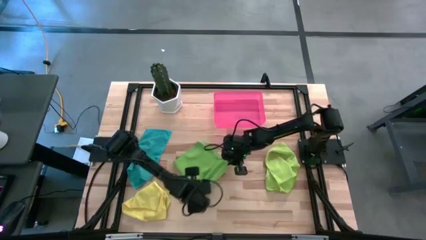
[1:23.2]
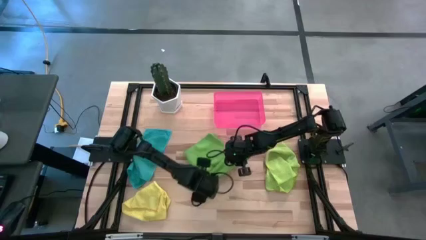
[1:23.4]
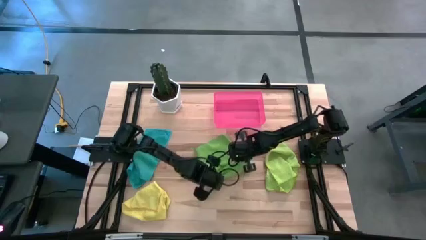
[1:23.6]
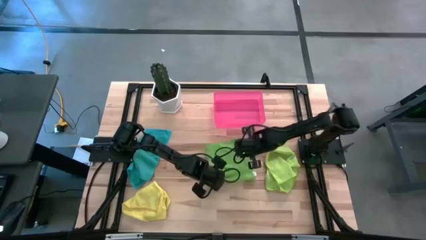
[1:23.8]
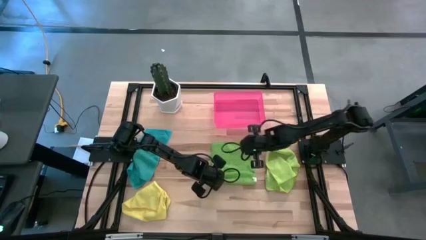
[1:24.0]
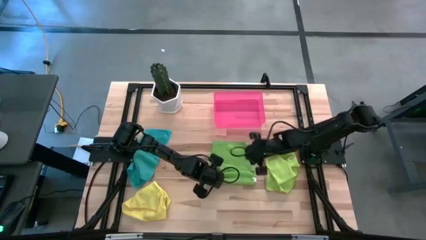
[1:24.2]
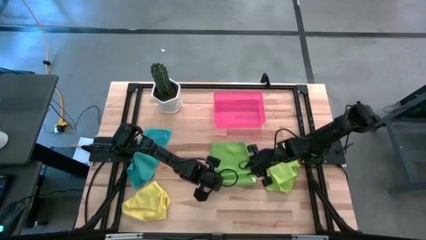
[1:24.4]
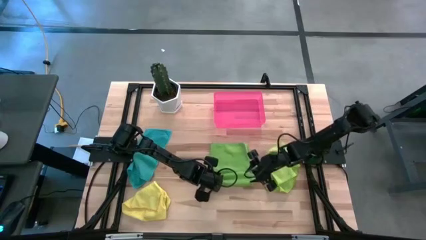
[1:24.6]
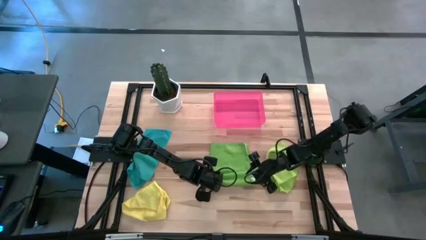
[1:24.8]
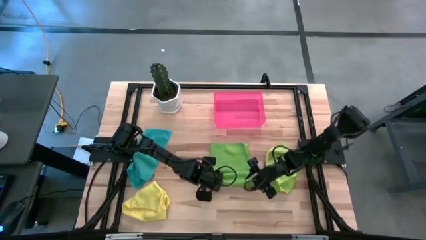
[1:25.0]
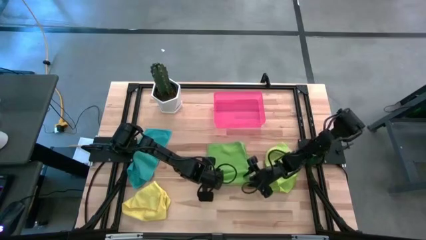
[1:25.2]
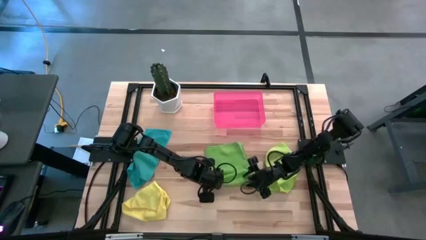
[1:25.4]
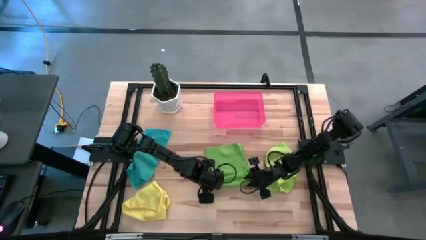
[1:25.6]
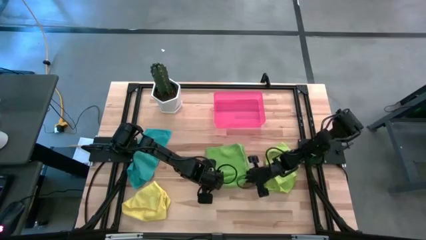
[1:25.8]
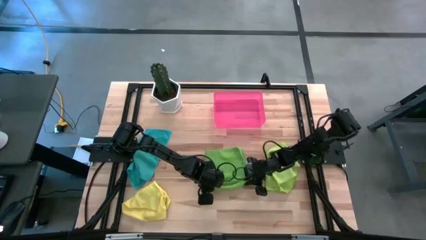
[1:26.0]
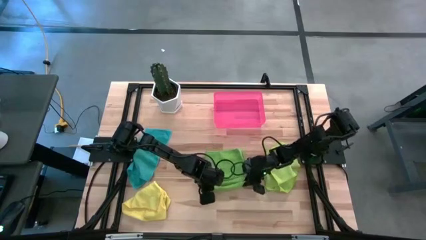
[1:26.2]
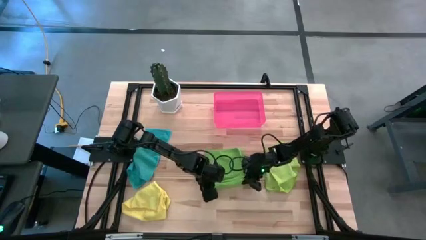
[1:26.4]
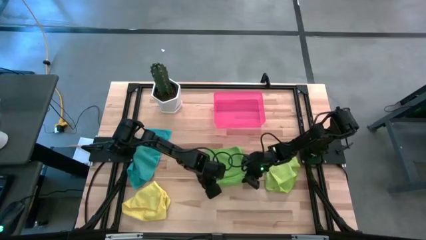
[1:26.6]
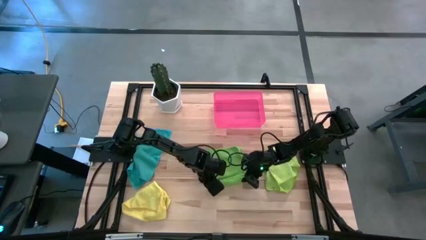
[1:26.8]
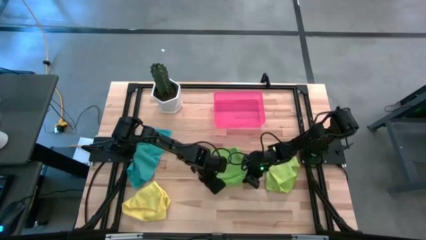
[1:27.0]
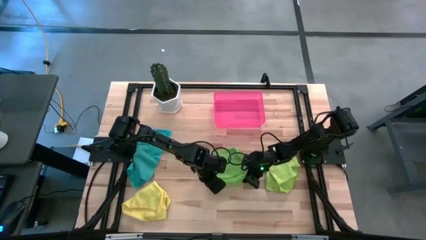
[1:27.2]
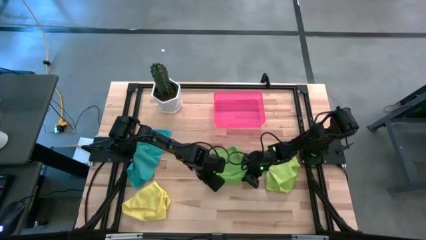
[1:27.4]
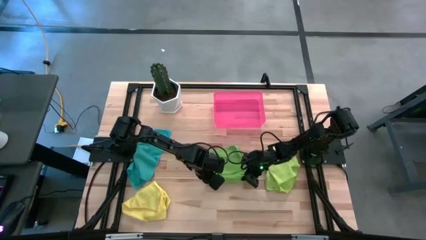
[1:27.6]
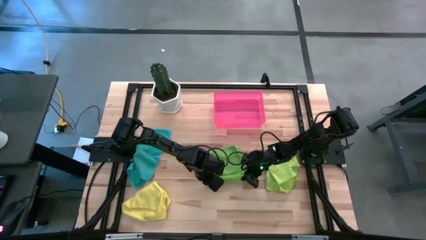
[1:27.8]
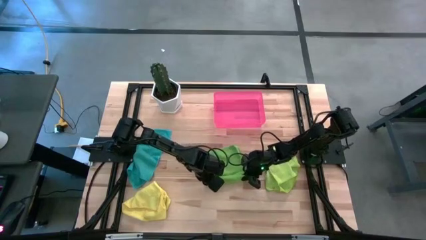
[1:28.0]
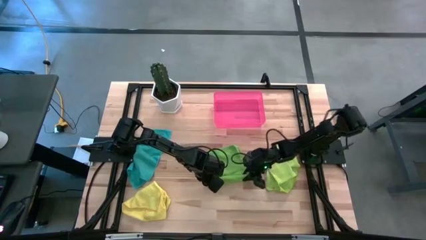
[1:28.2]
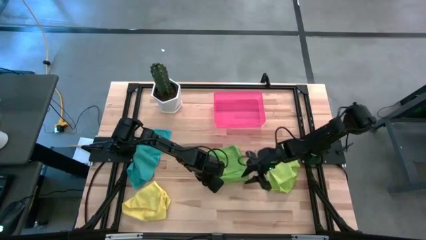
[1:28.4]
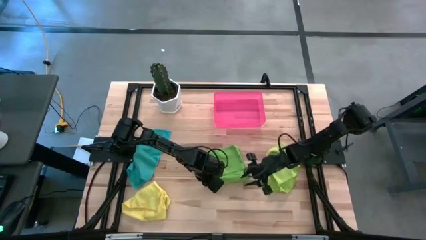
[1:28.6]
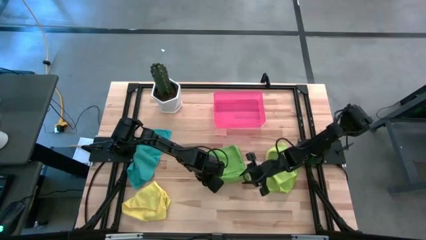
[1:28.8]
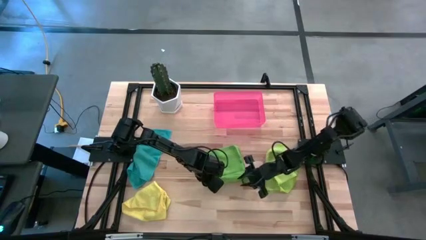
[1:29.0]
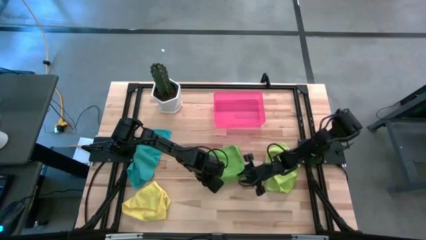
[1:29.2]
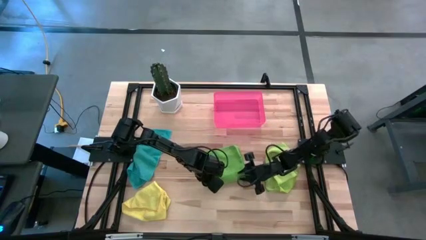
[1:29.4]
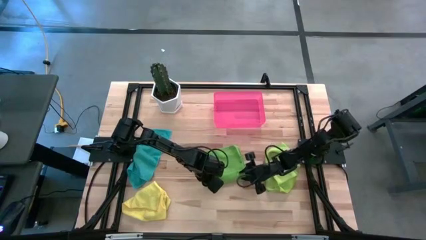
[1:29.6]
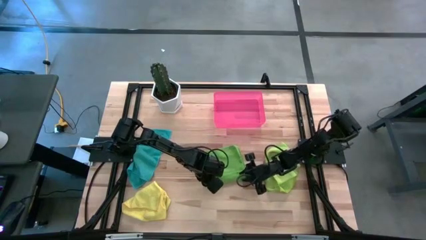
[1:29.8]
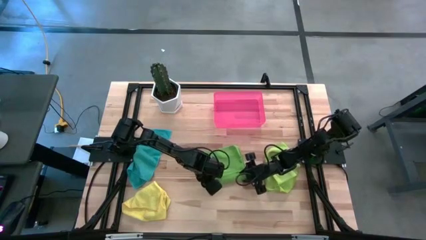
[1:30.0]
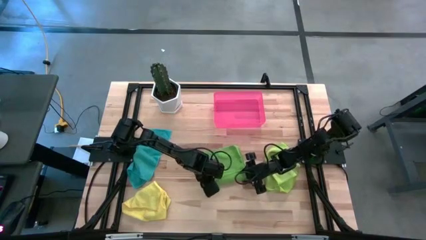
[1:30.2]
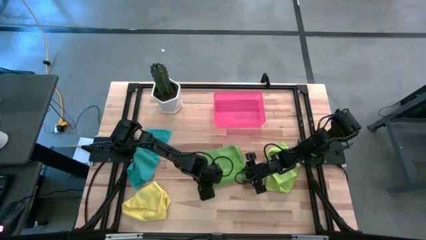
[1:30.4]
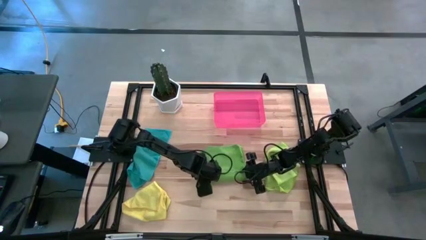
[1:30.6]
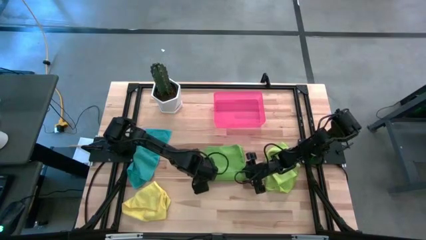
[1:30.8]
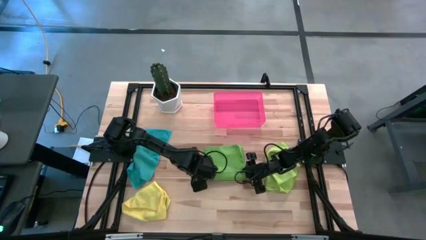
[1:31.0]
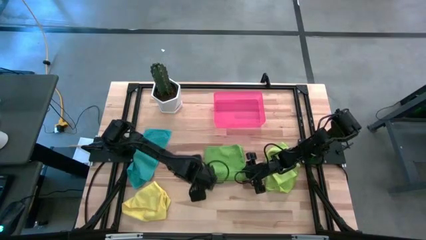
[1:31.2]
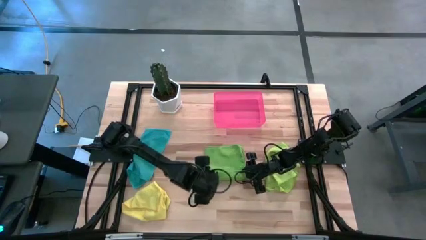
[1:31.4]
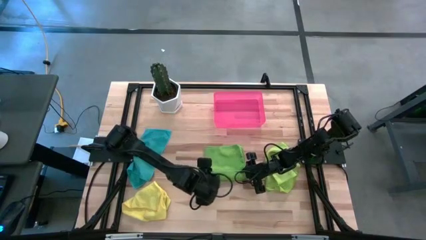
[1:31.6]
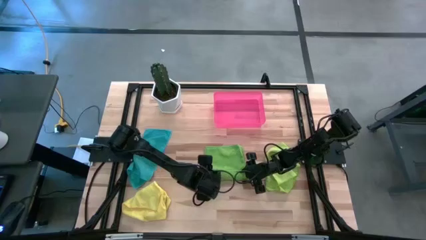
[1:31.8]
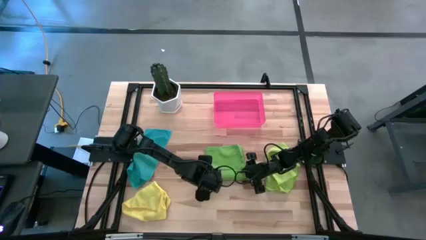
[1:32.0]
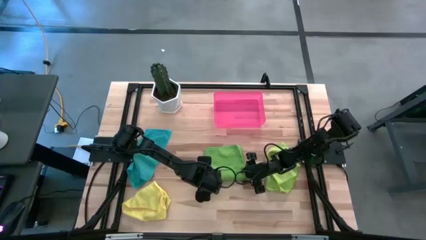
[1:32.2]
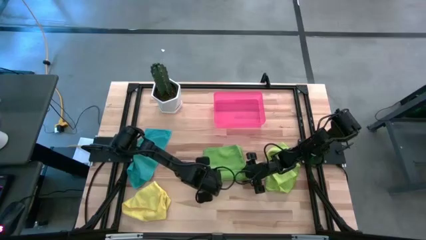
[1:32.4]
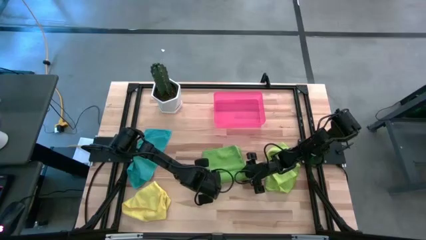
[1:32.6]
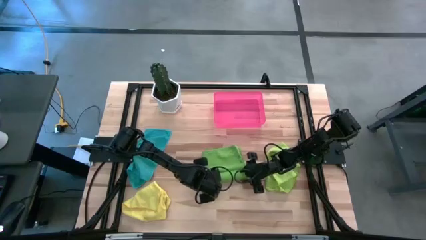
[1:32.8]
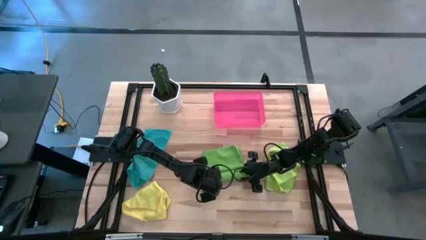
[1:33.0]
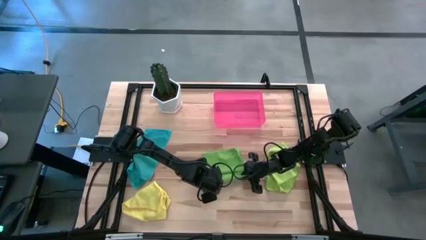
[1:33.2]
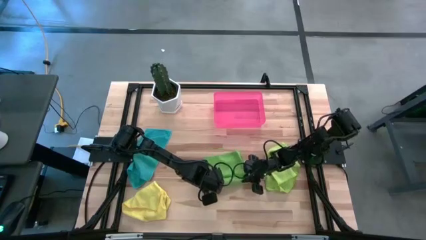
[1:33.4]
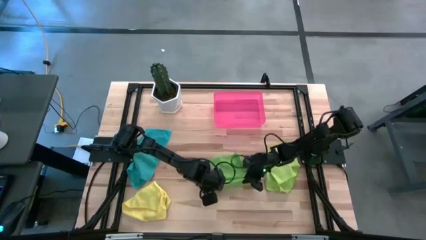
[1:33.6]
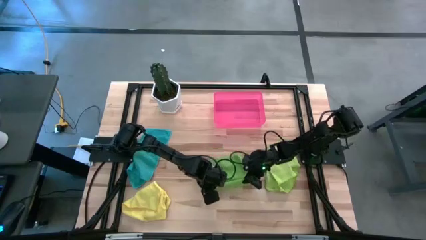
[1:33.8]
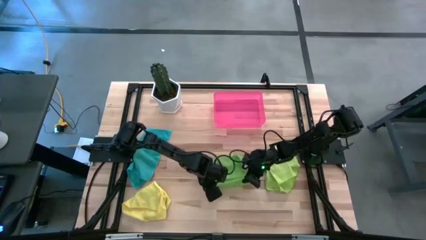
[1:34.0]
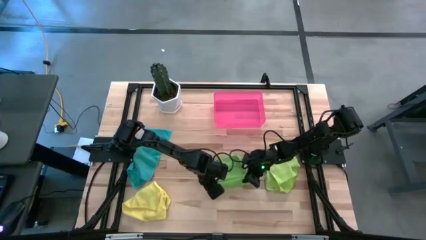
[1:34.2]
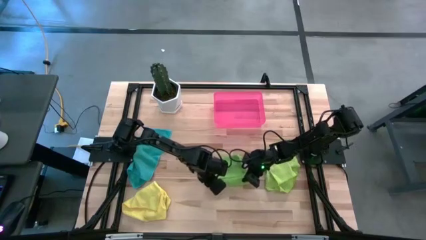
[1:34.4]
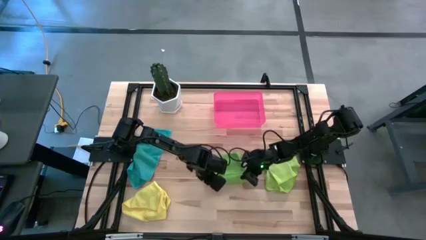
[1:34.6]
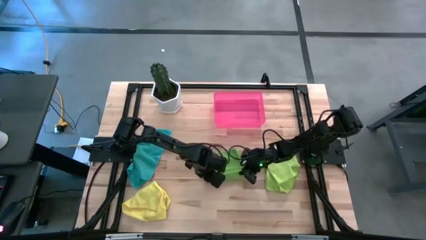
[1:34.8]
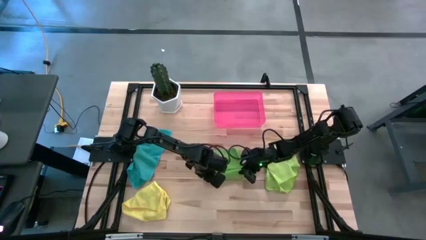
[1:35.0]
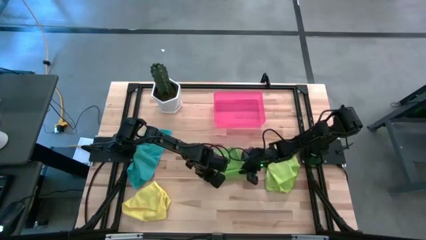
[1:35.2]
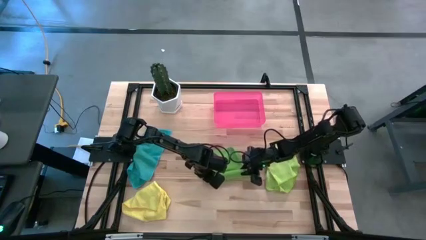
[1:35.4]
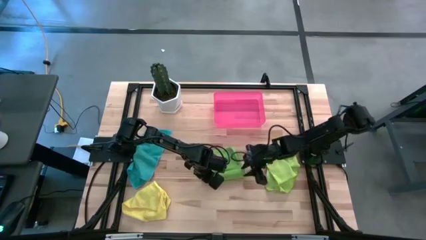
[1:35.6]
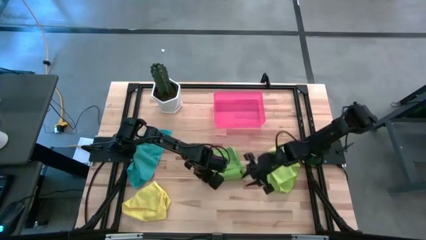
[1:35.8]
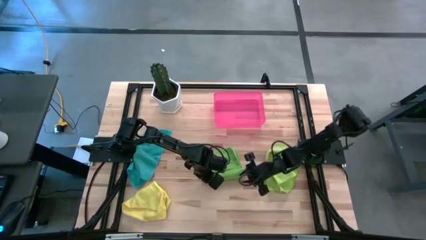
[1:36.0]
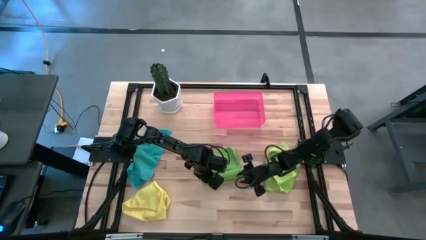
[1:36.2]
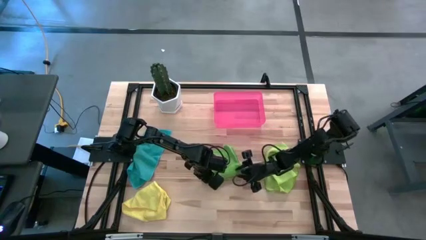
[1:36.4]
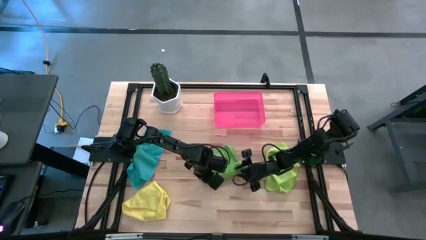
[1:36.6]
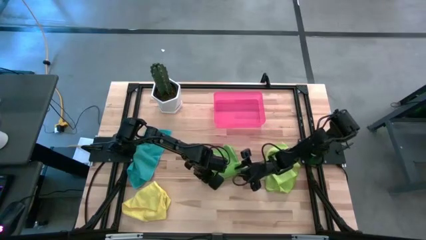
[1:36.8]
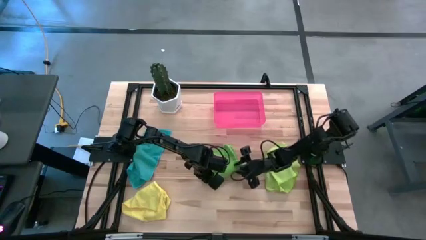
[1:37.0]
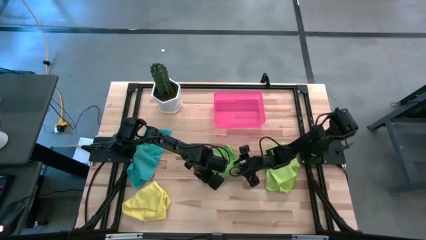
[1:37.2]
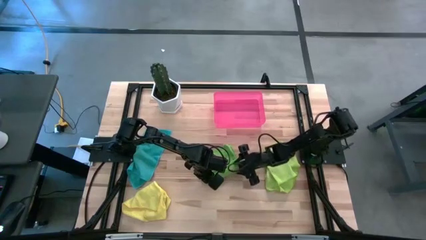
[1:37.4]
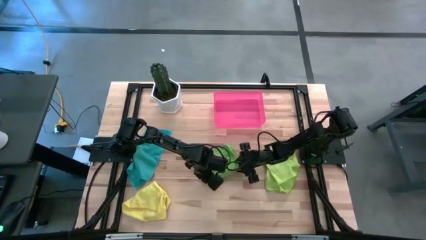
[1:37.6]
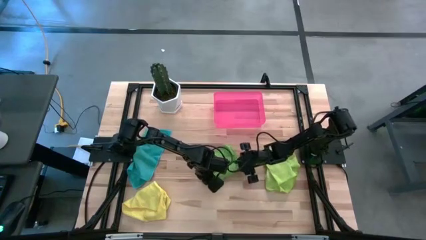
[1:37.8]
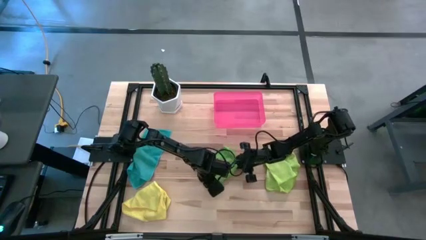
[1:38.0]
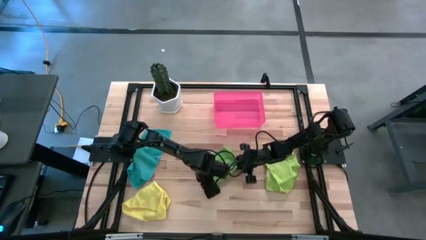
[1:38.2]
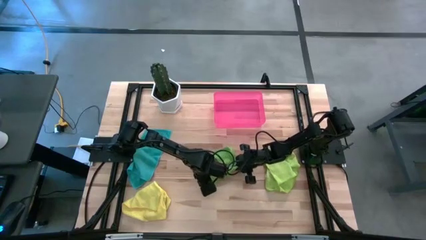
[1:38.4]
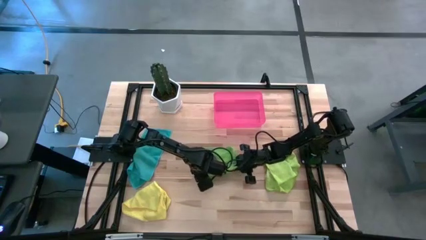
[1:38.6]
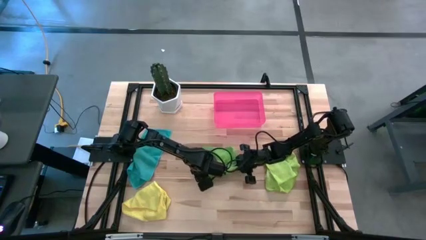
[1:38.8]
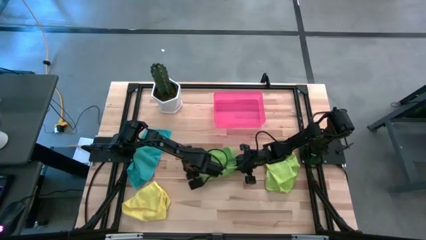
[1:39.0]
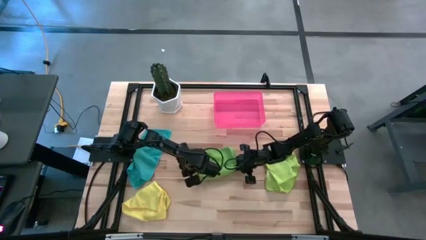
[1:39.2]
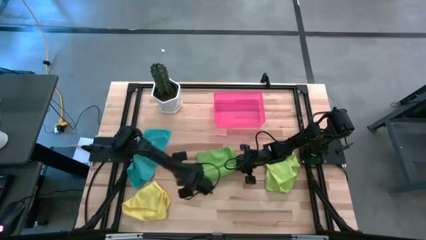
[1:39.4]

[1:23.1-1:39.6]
Task: Roll microfiber towels into tight, uniform cylinder then place into a basket
Roll the green microfiber cloth
